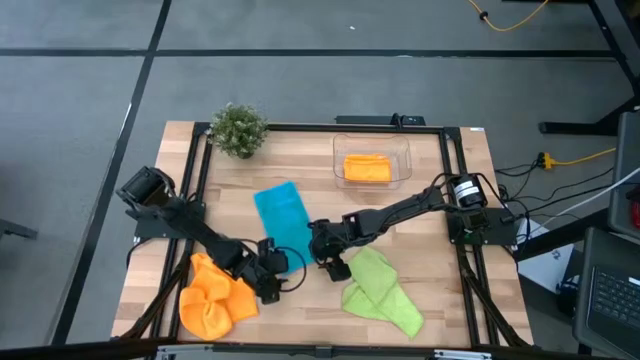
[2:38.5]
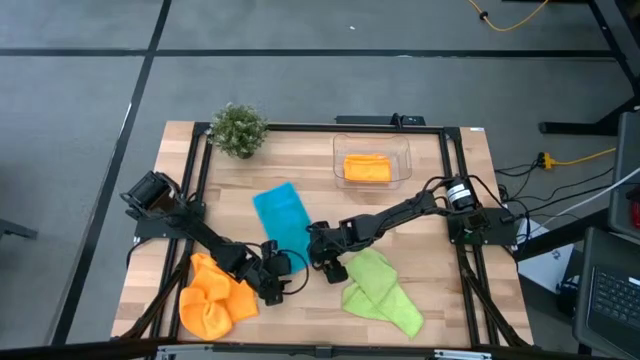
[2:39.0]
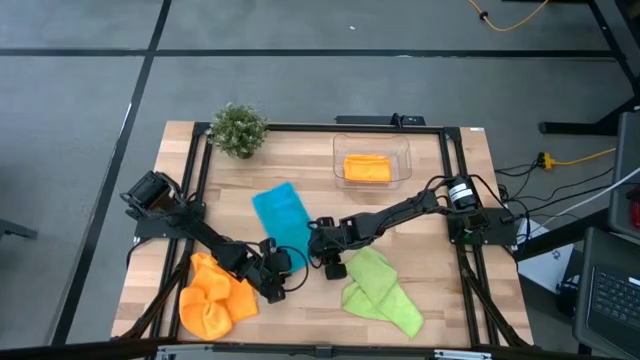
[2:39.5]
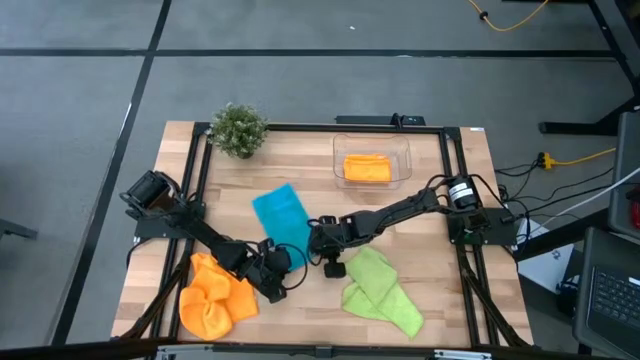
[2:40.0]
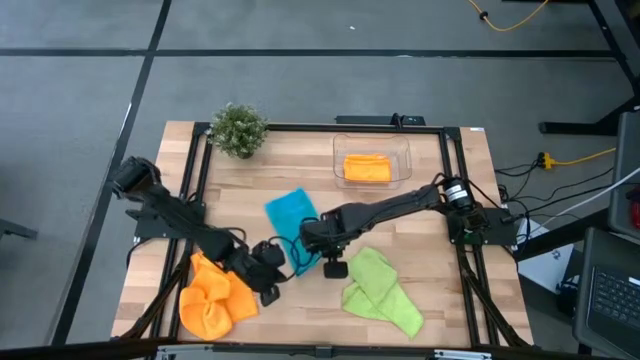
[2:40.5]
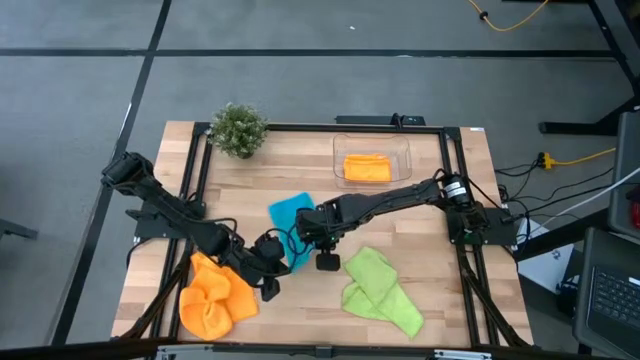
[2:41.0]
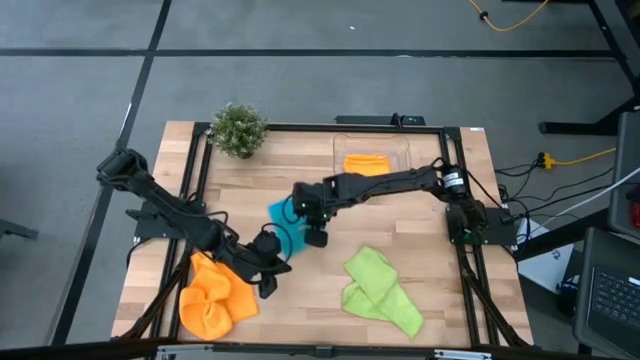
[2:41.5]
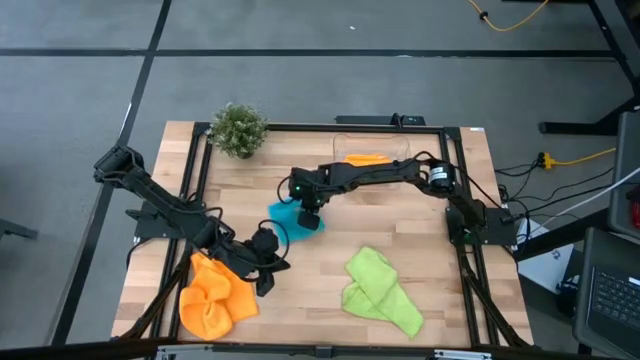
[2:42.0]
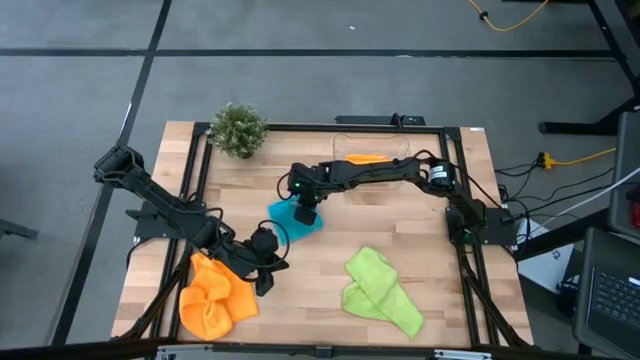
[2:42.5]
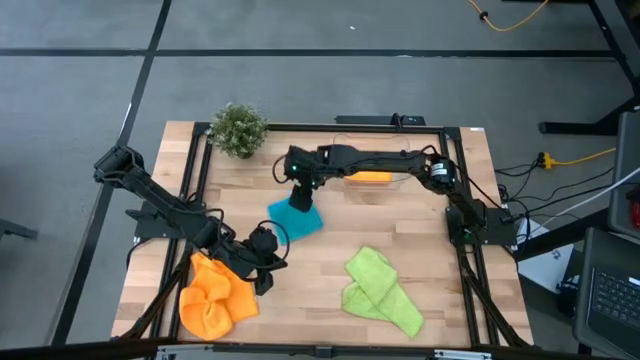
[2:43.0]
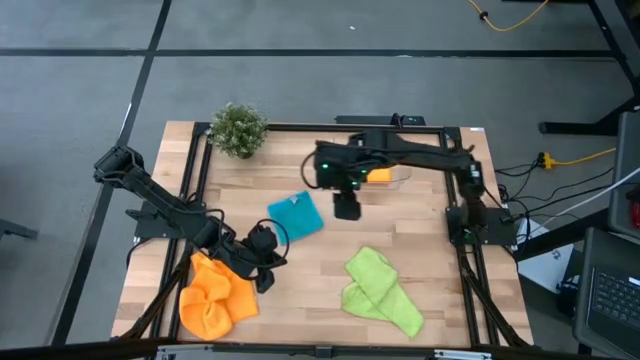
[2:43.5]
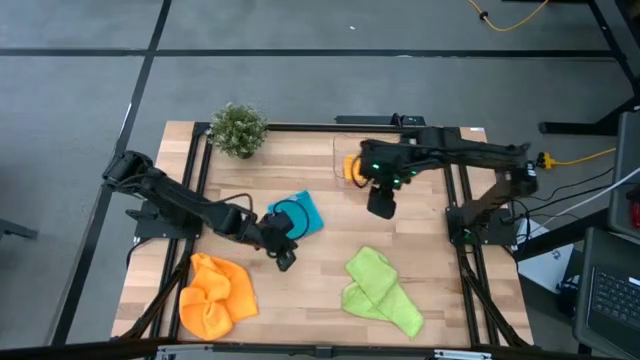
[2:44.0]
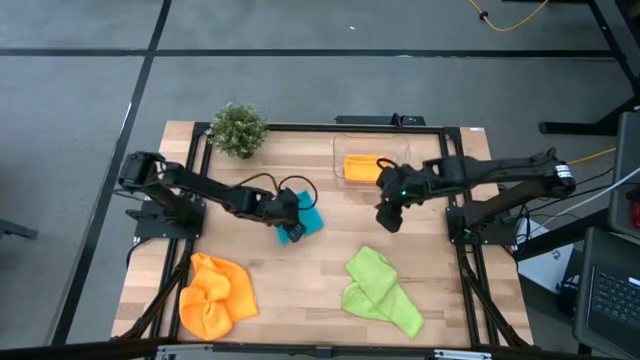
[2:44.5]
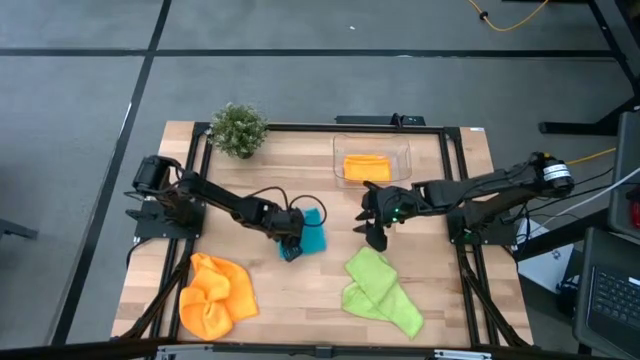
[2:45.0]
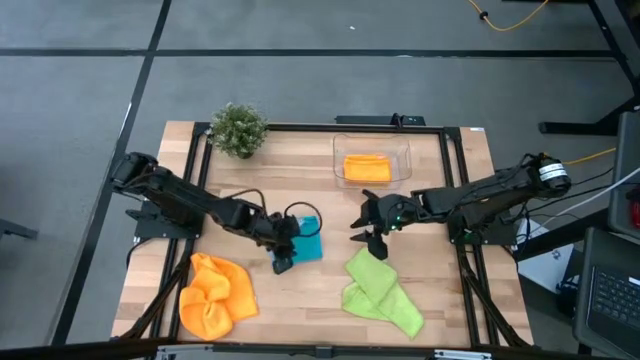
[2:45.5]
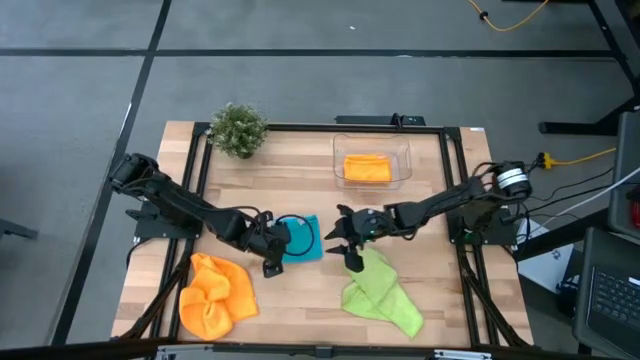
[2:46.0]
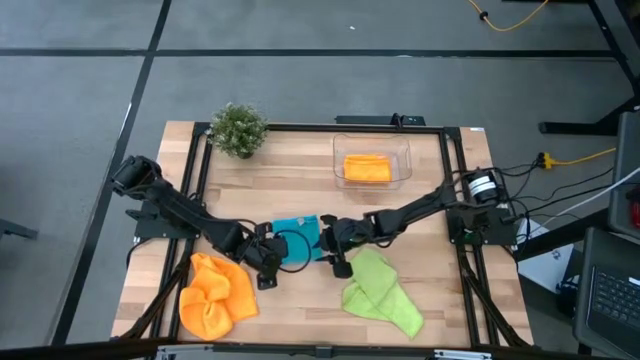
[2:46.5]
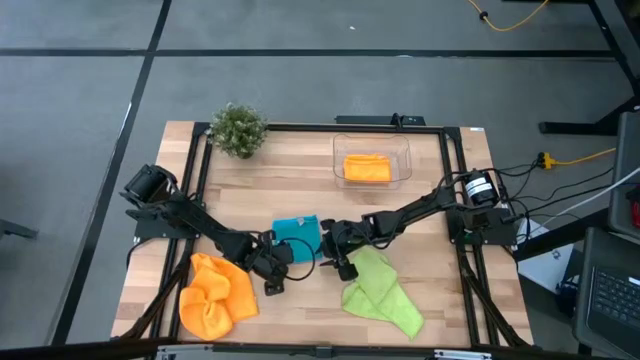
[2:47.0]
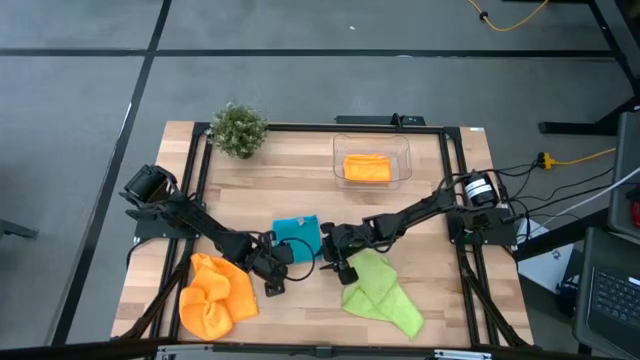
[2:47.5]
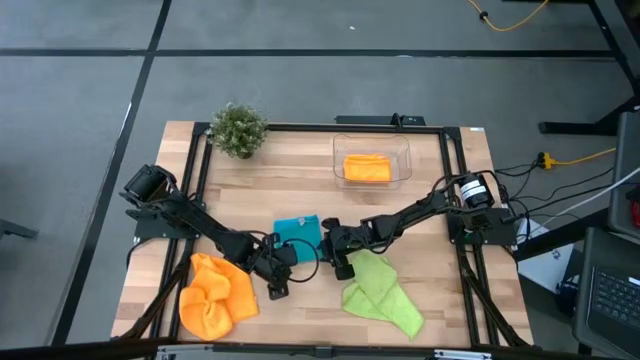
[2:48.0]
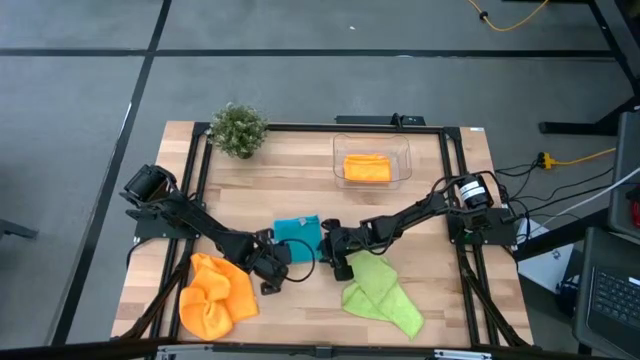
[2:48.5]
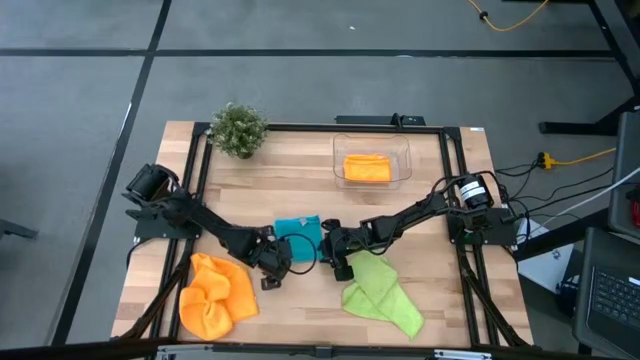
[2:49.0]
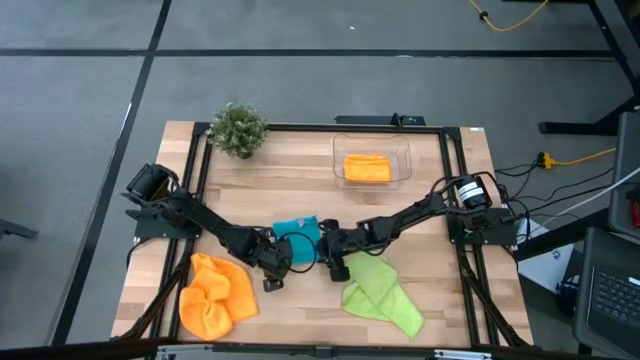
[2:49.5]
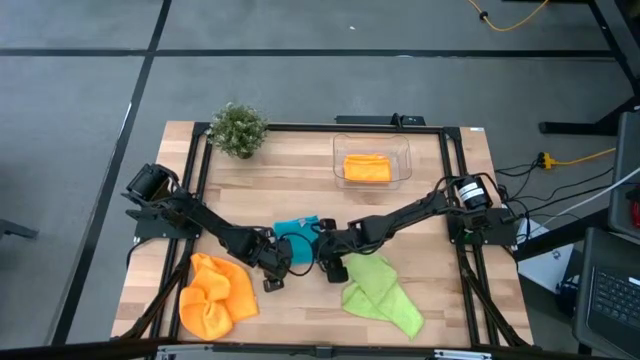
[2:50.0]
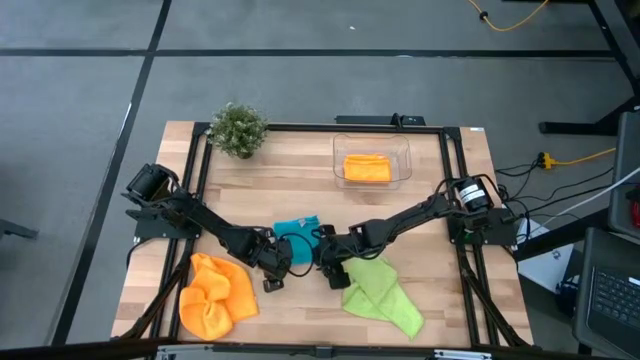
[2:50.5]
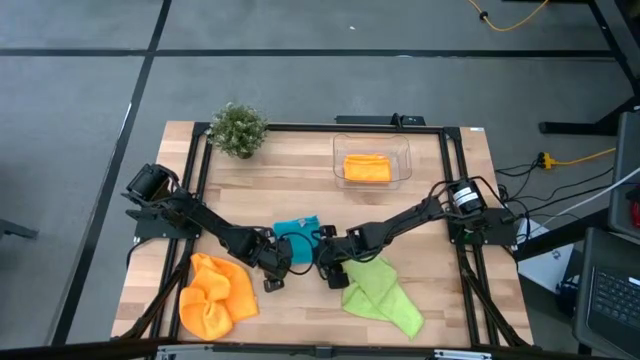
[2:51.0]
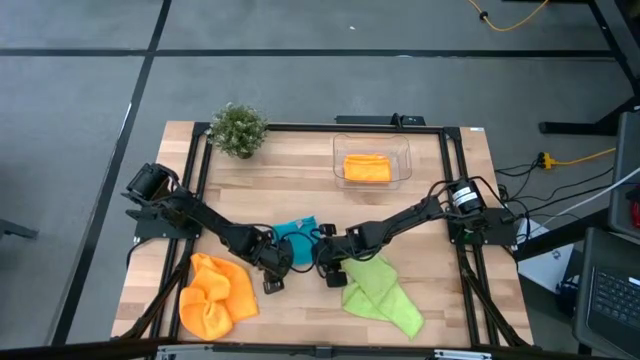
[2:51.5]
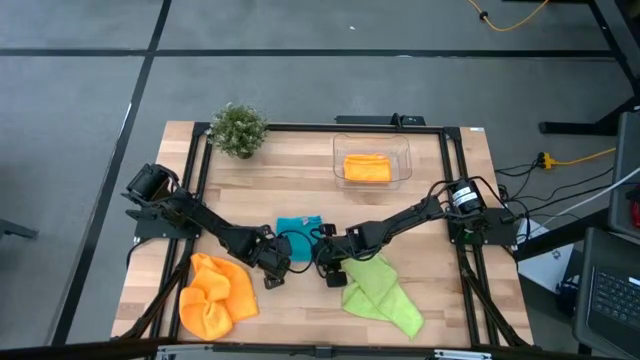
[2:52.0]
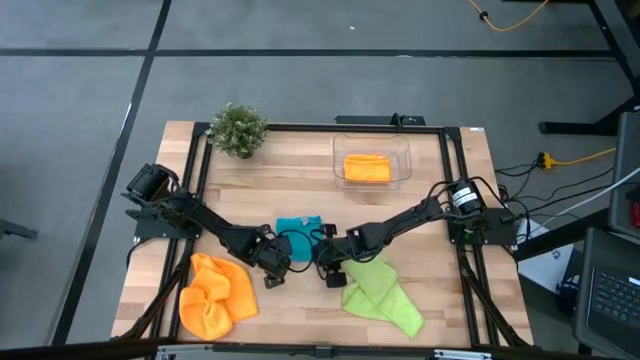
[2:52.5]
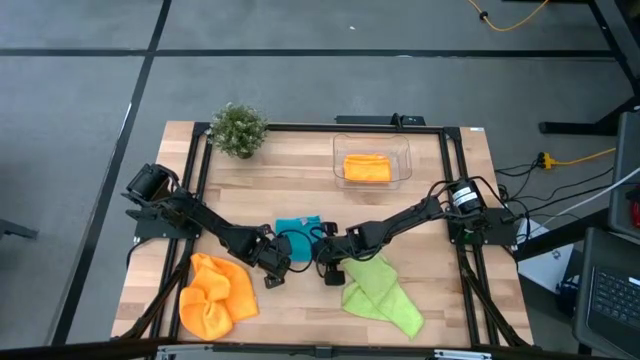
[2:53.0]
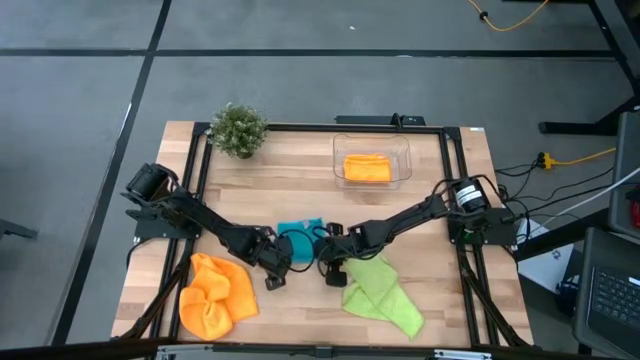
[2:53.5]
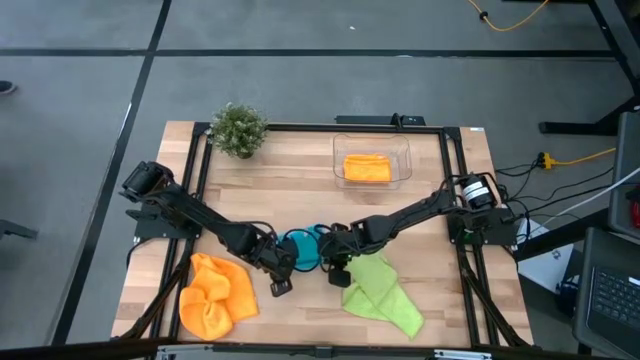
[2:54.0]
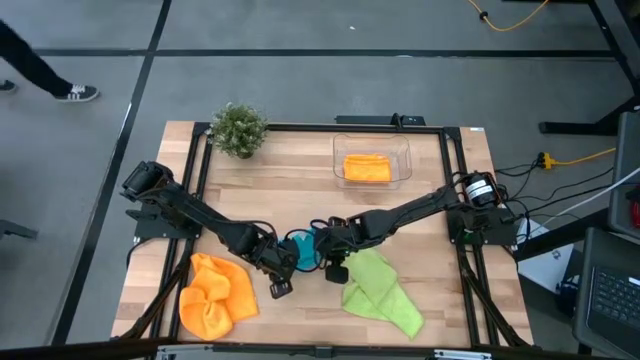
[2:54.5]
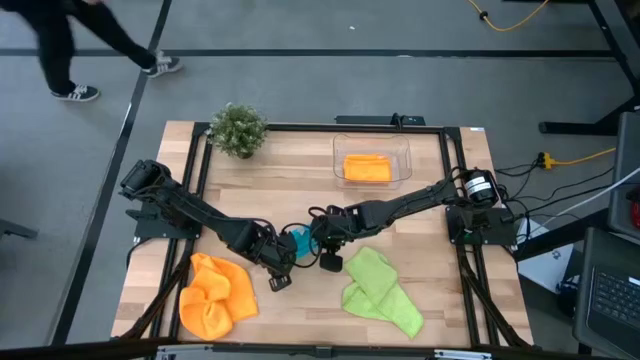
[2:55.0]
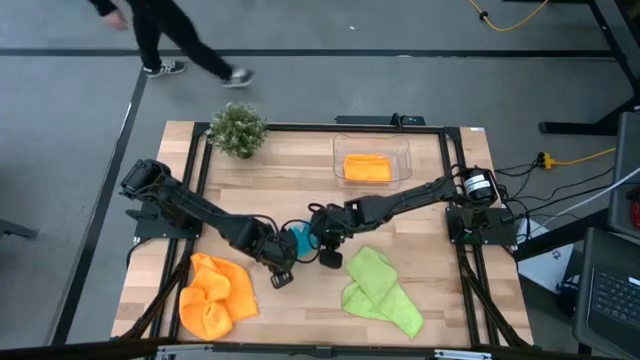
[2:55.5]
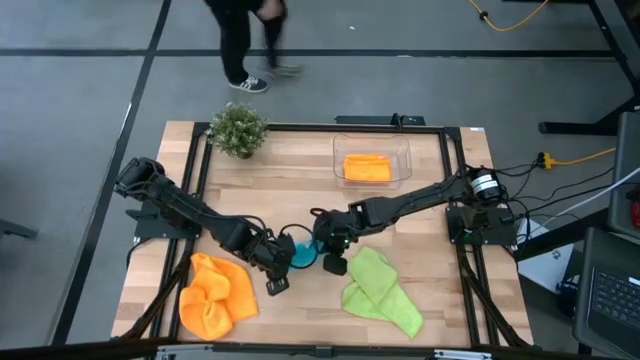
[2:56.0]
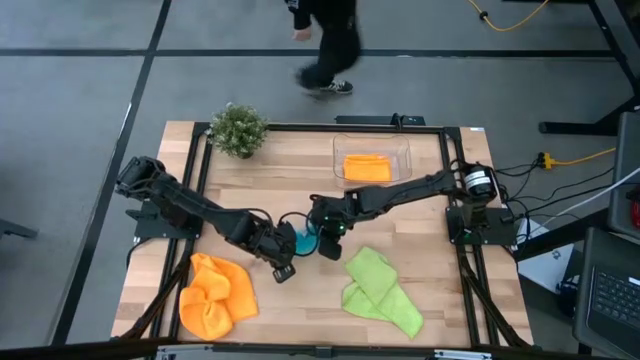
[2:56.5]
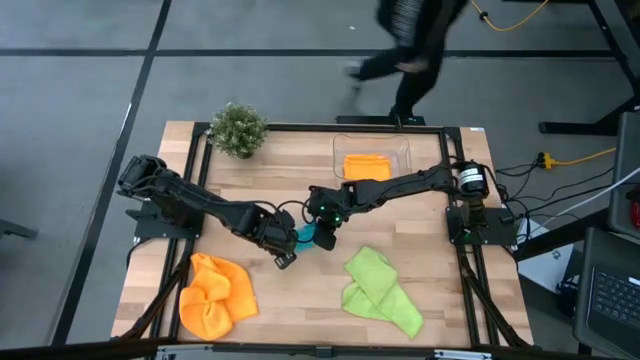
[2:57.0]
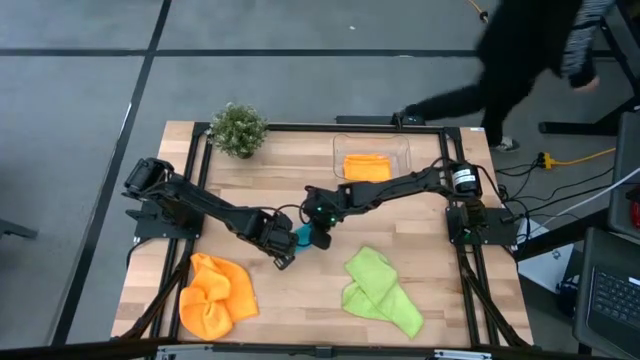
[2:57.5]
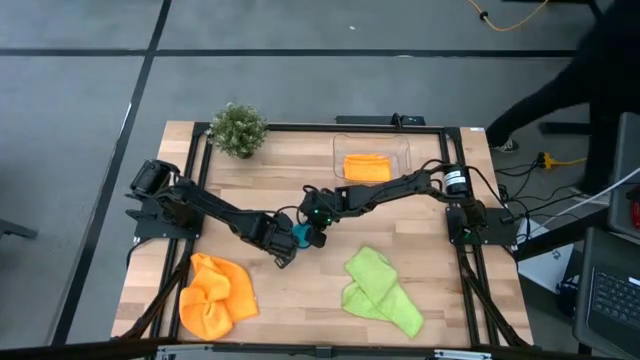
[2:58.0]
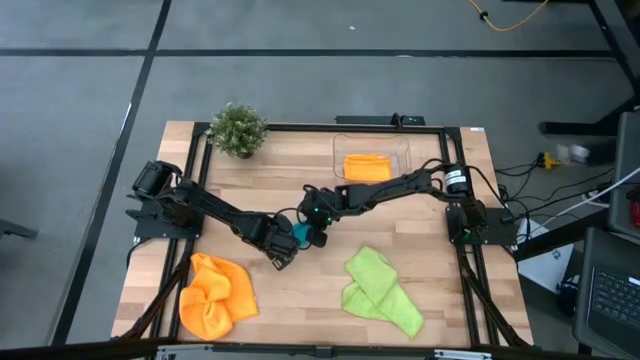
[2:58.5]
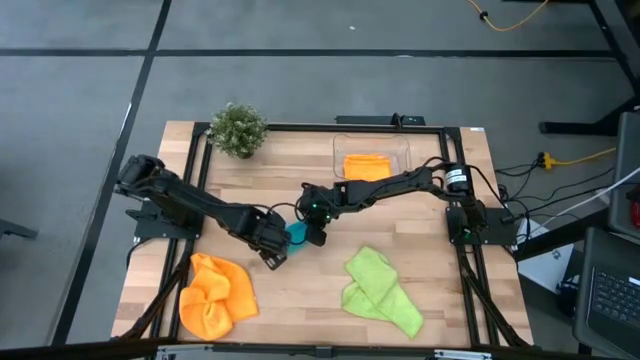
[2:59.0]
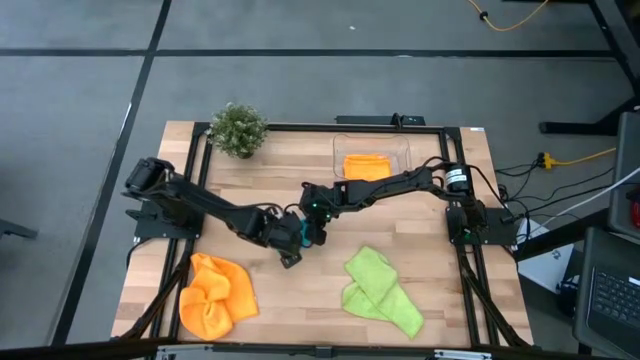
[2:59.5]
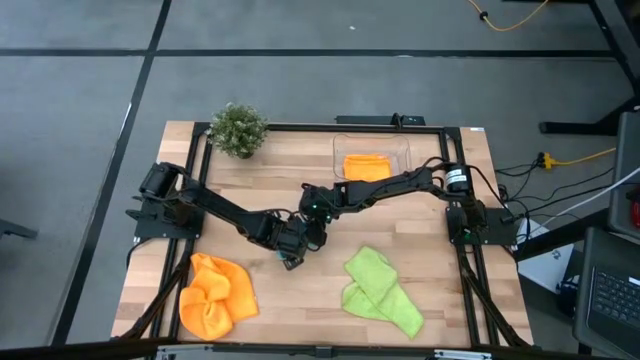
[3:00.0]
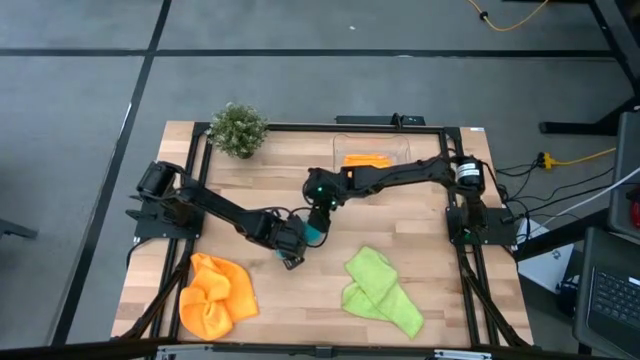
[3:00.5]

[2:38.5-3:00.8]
Task: Fold microfiber towels
Fold the blue microfiber cloth
